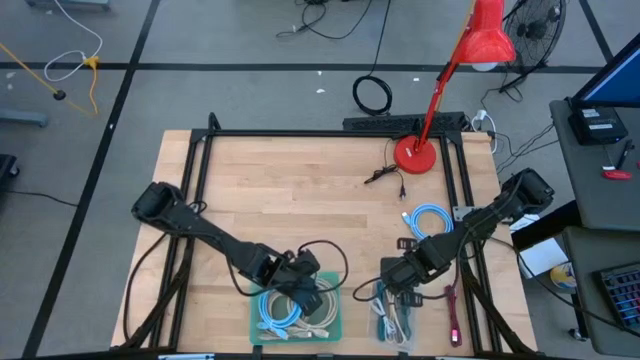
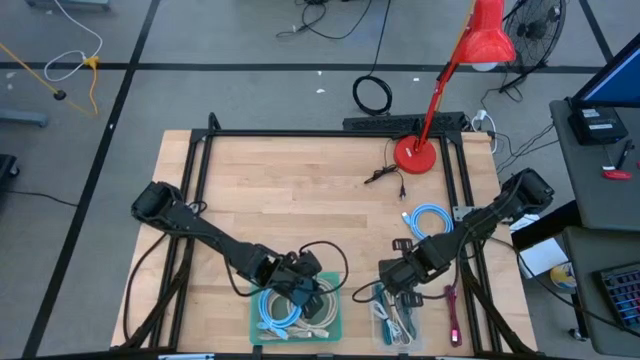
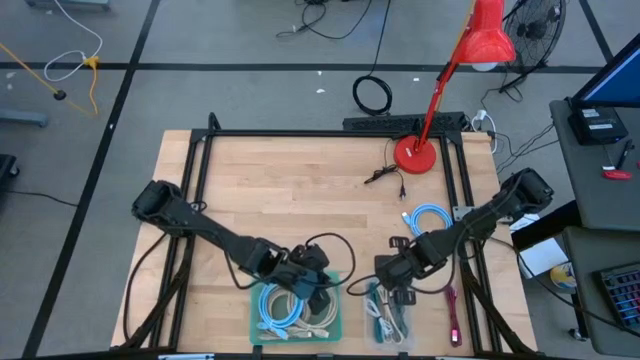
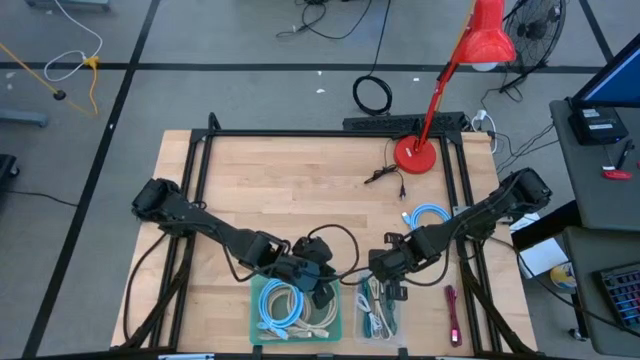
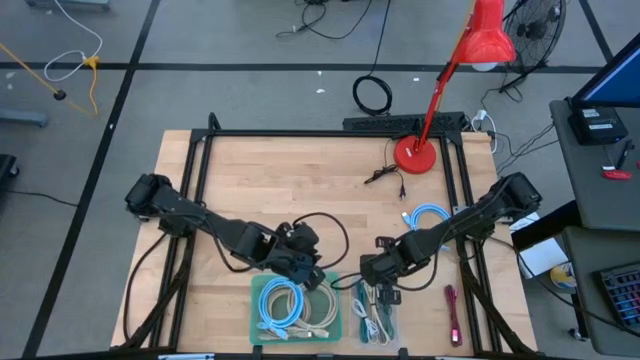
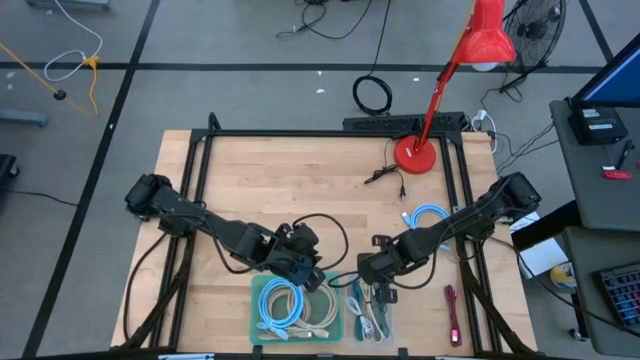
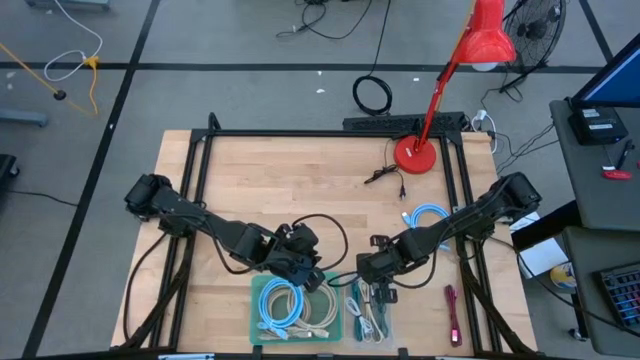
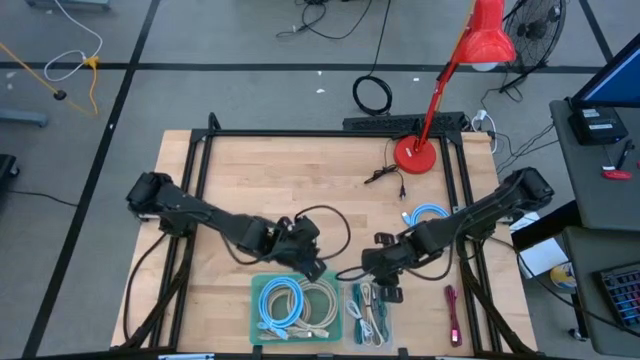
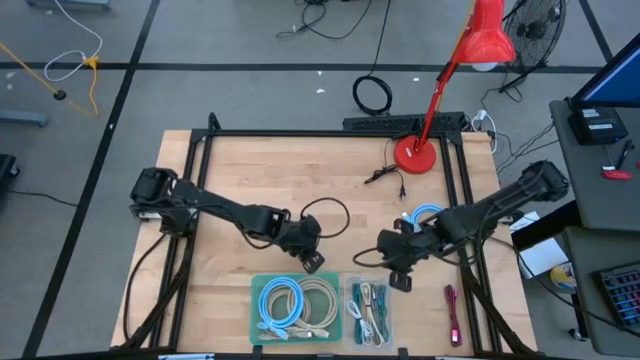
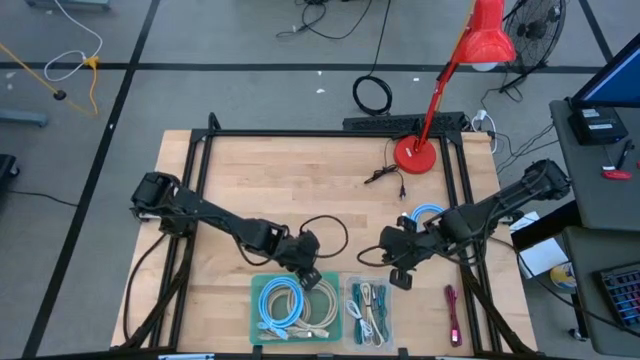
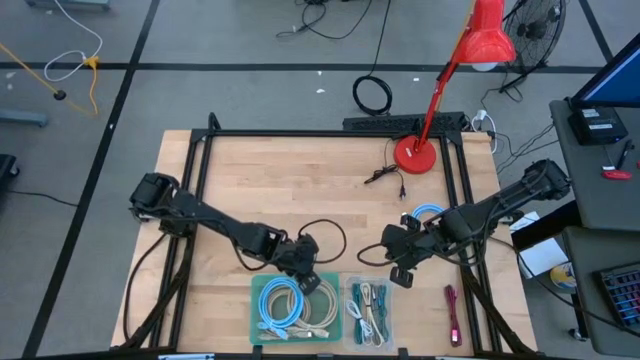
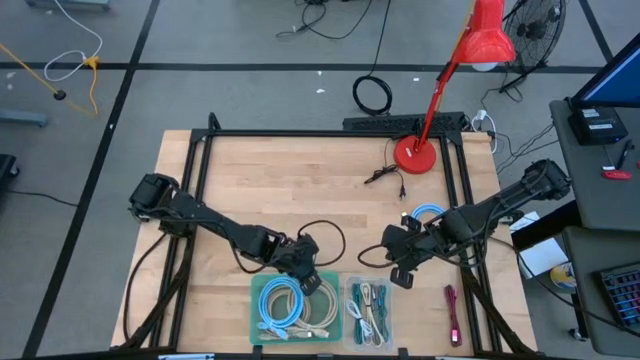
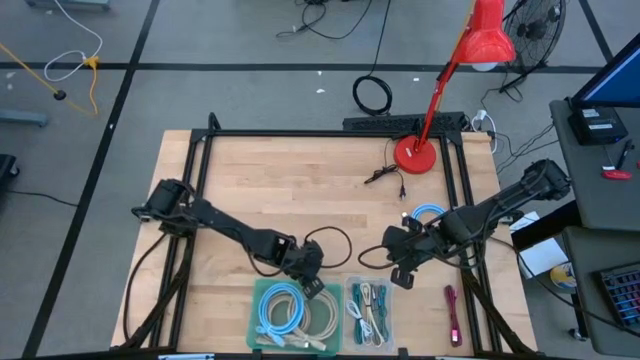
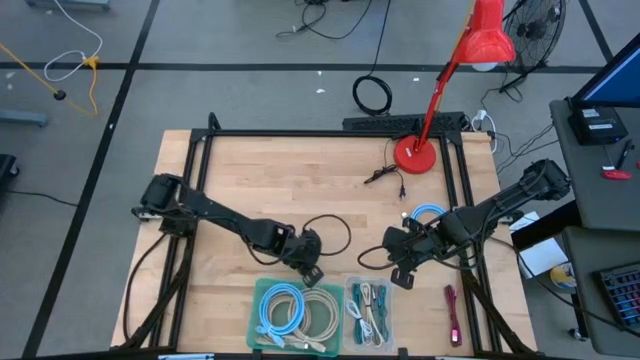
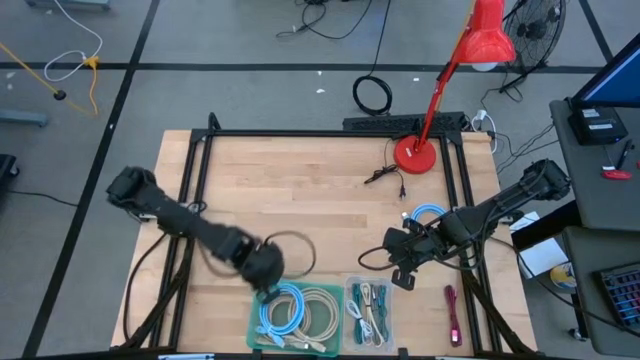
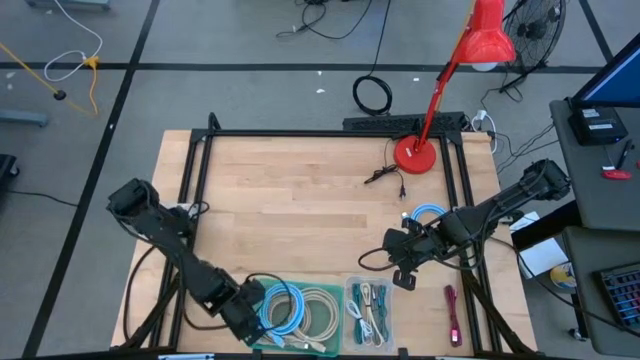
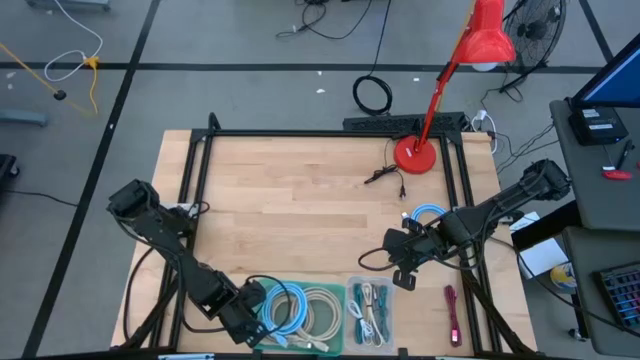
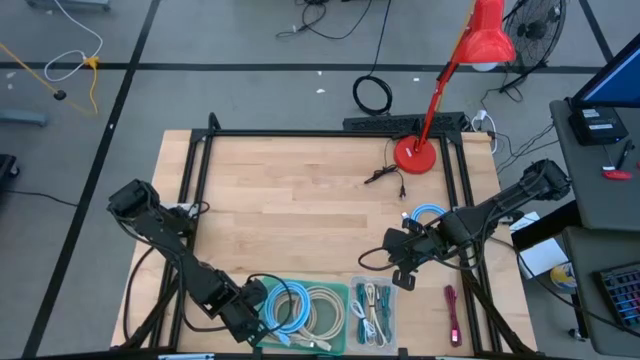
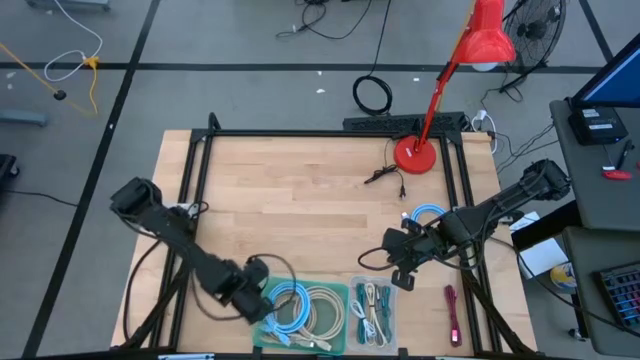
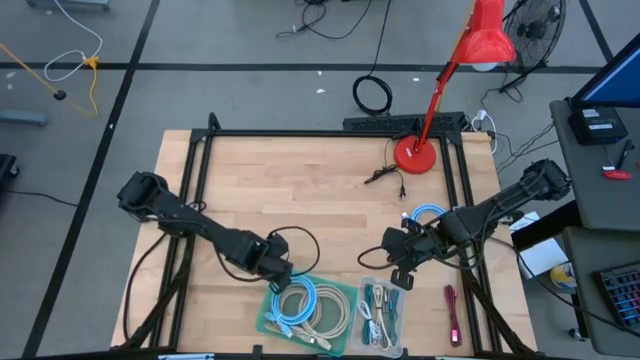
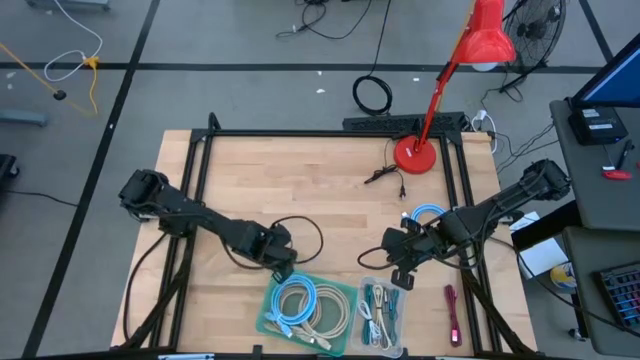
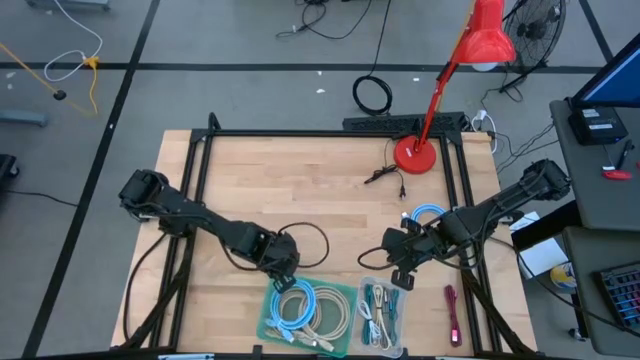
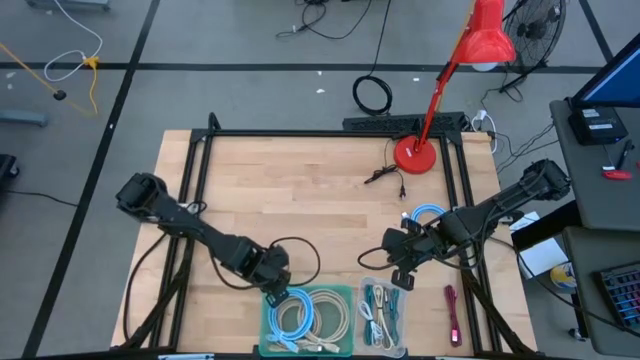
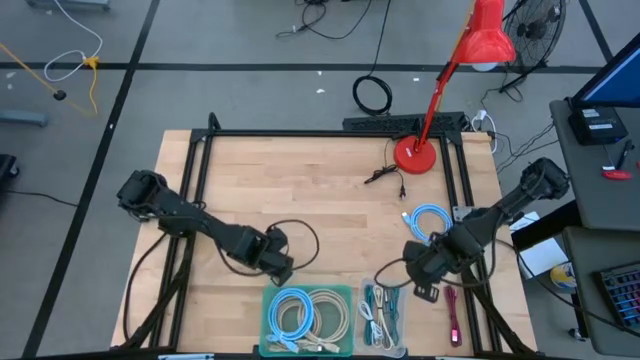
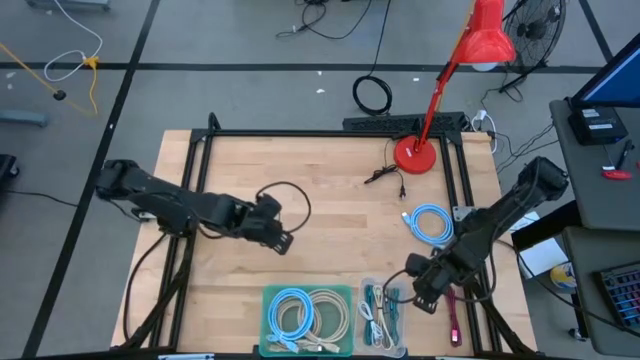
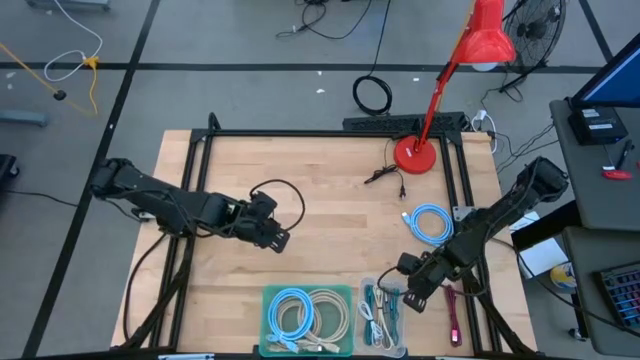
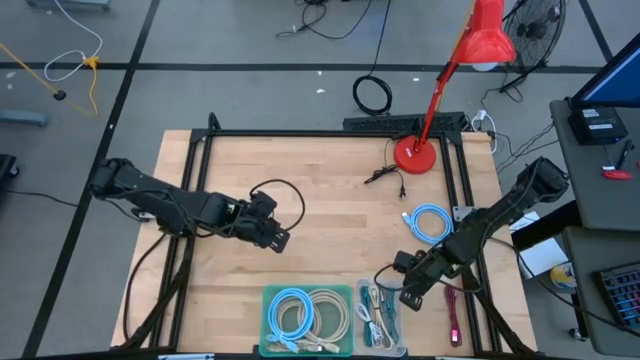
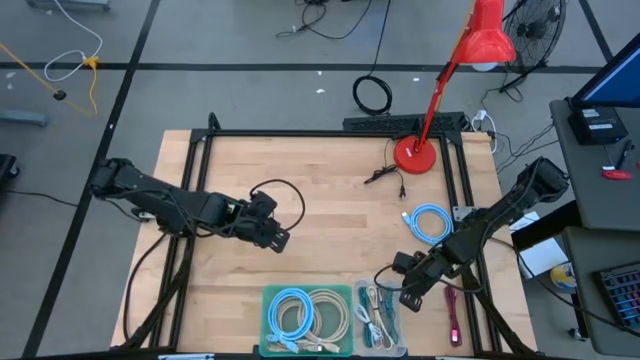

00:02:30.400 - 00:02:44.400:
Task: Pick & Place USB Port
Adjust the bins

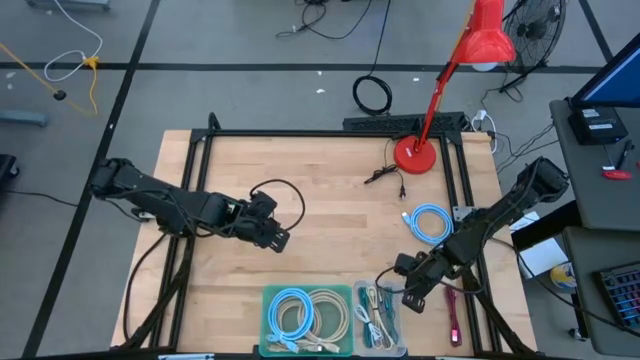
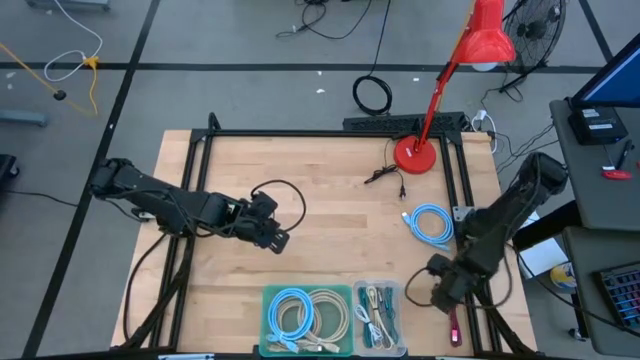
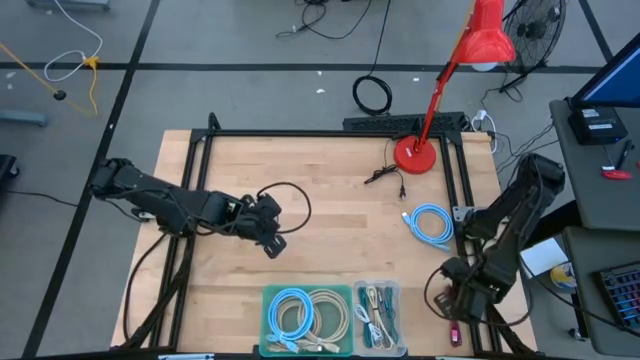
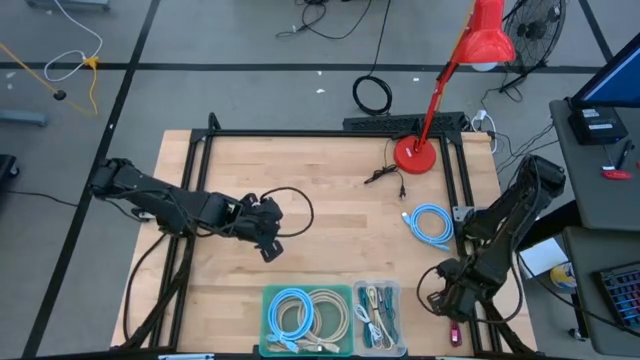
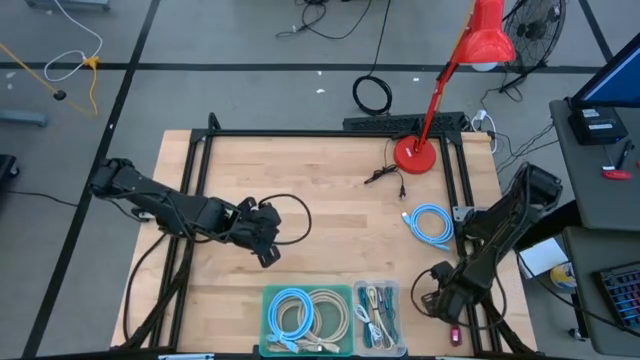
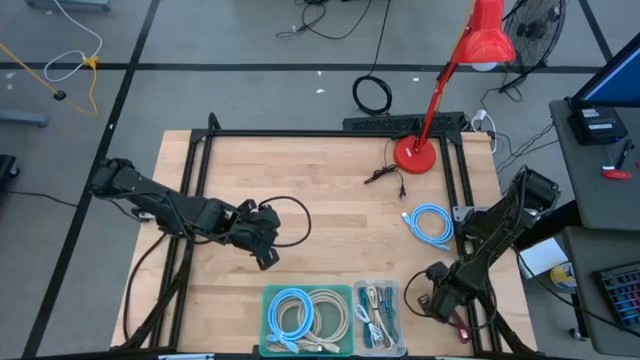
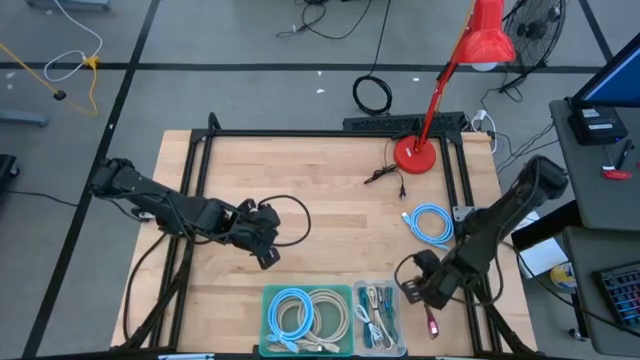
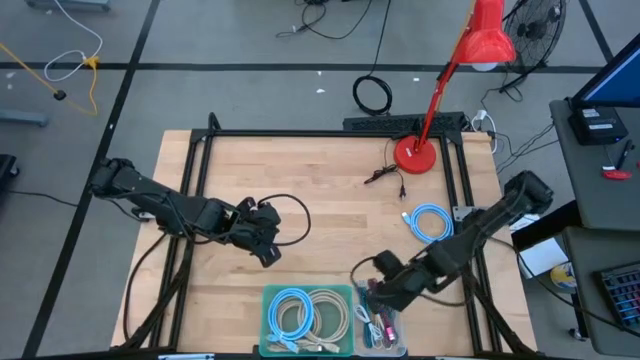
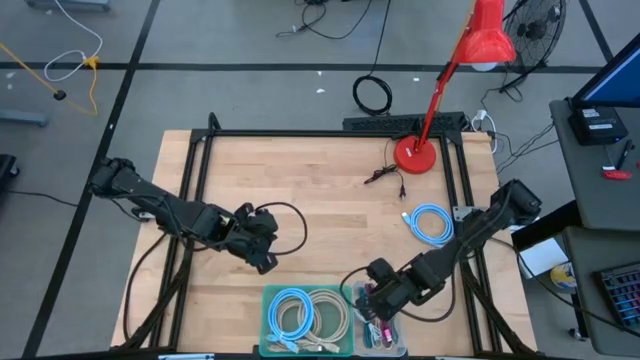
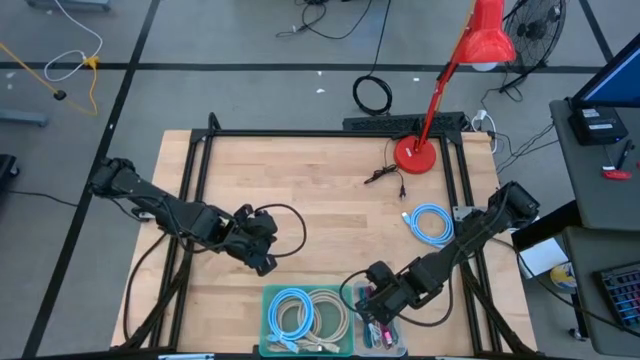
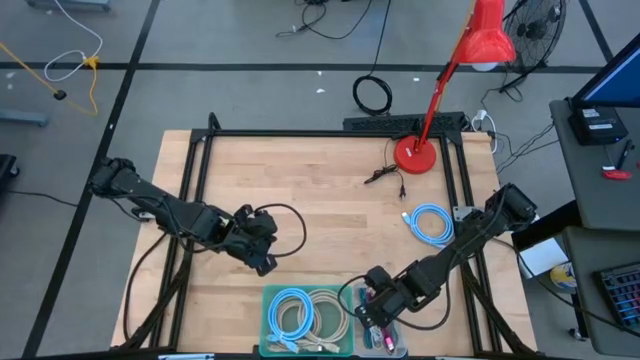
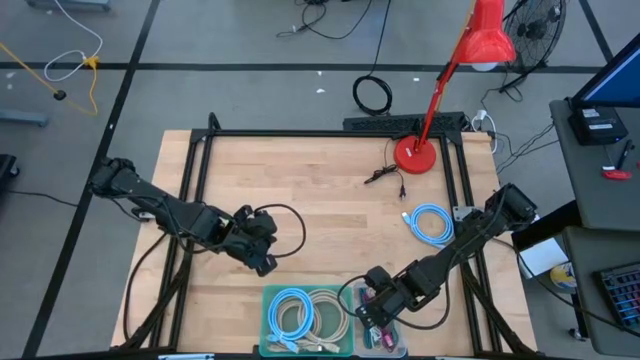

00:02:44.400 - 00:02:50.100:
Put the pink charger cable into the white transparent bin

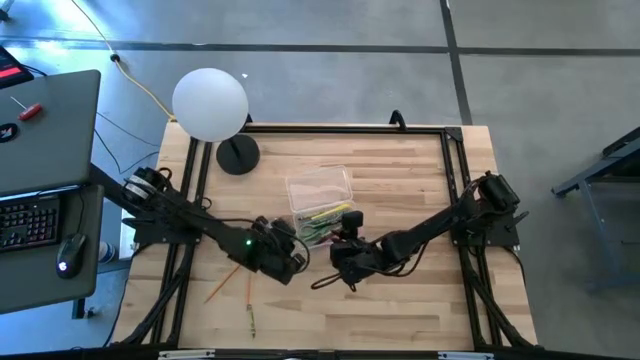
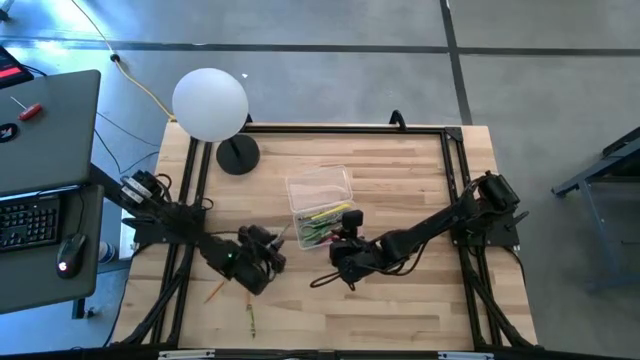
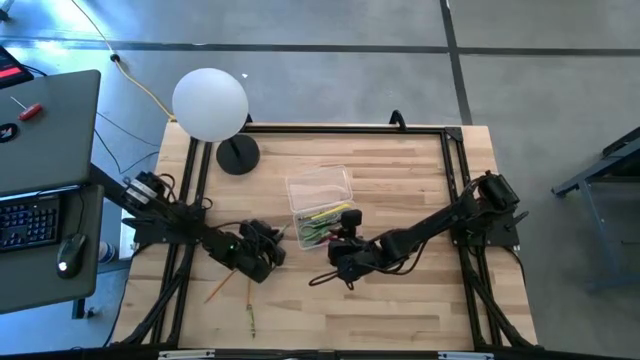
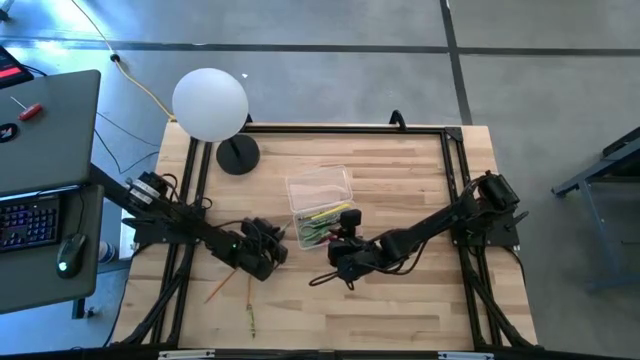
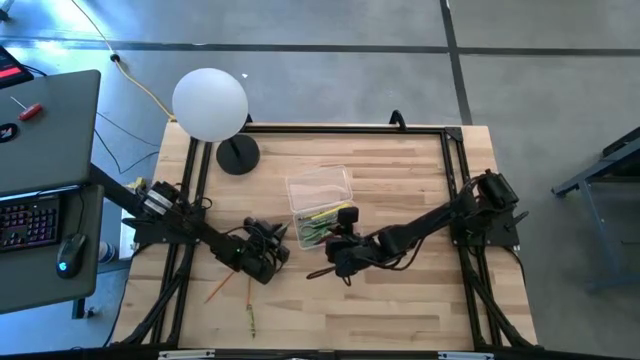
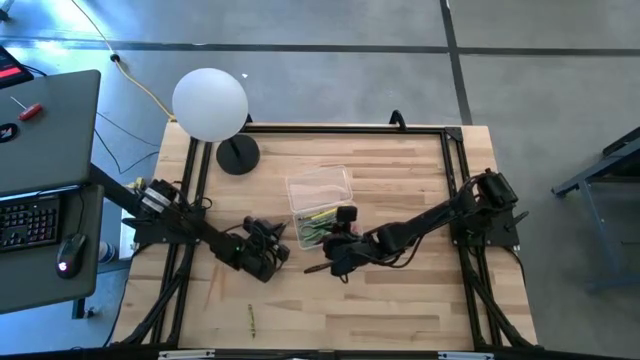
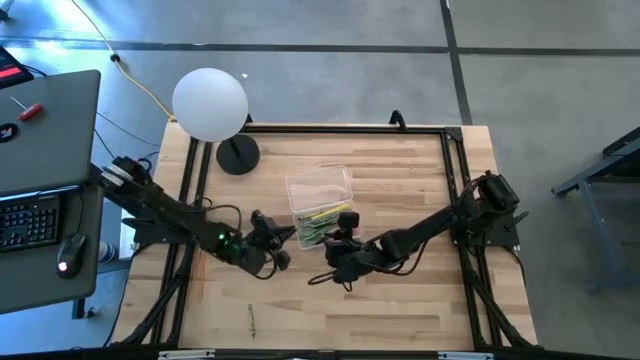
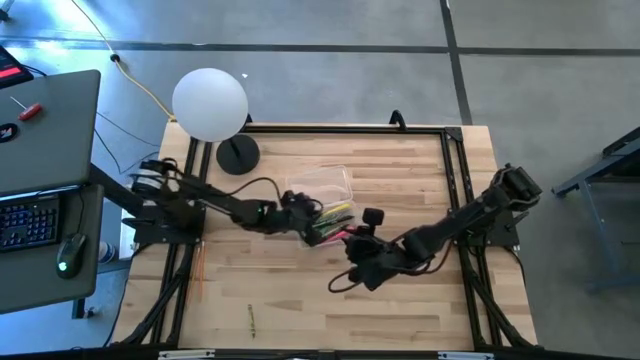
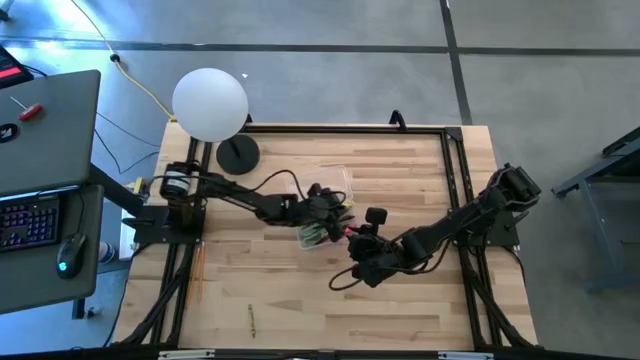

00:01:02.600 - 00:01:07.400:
Task: Pick & place school supplies into a supply box
Put the blue pencil into the transparent supply box
